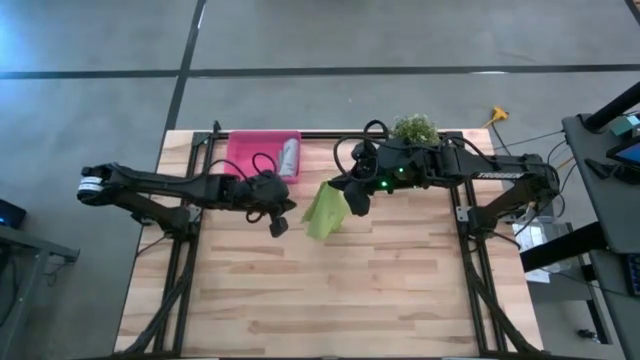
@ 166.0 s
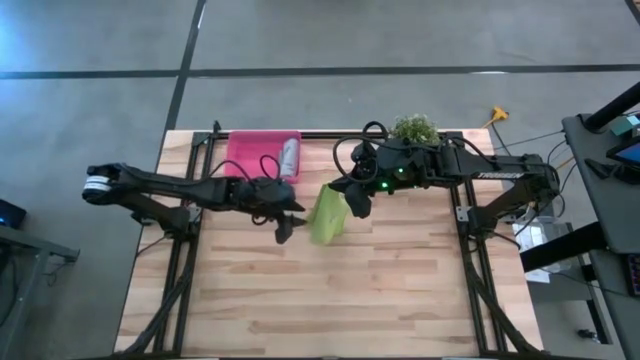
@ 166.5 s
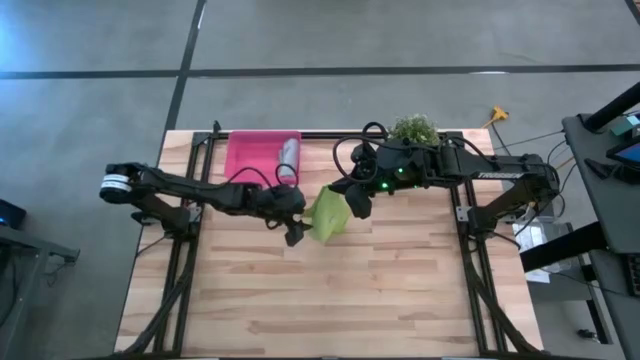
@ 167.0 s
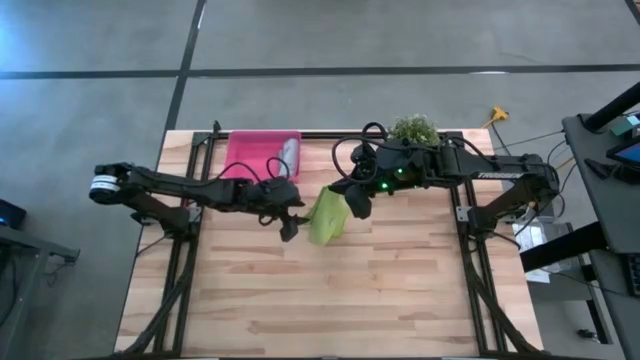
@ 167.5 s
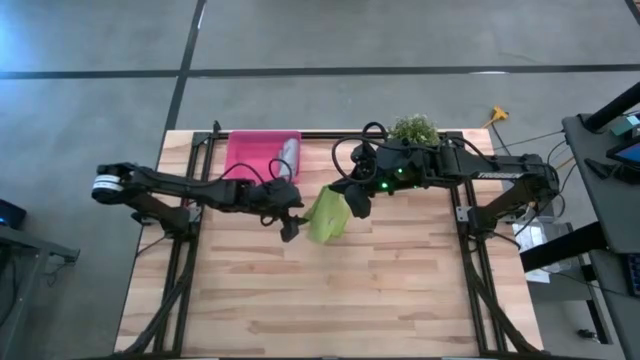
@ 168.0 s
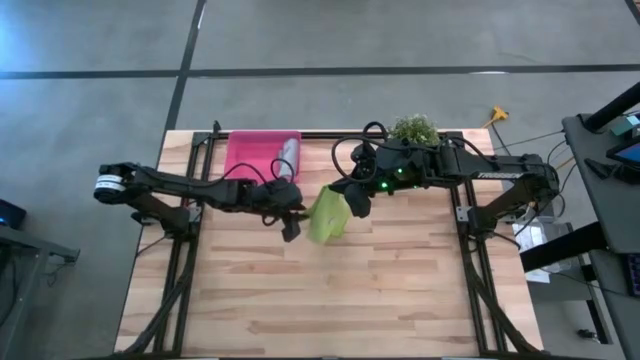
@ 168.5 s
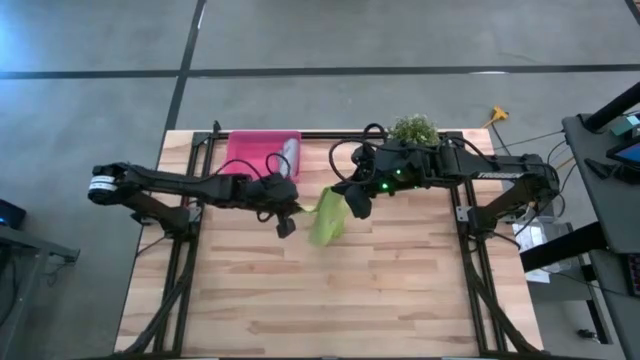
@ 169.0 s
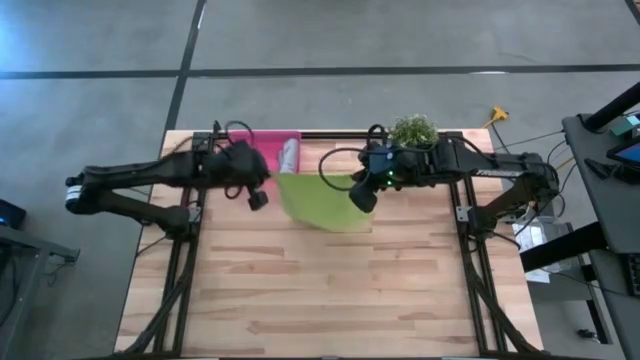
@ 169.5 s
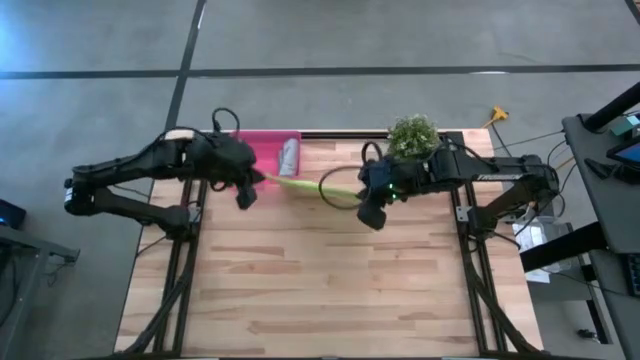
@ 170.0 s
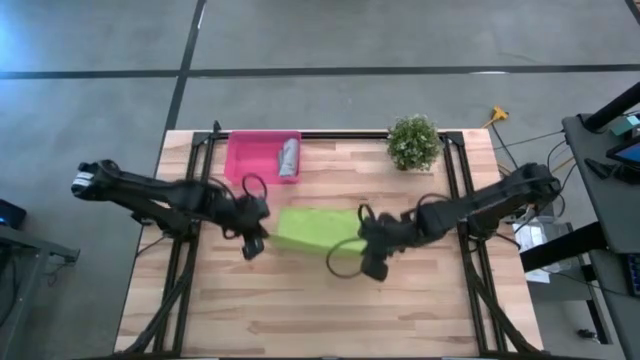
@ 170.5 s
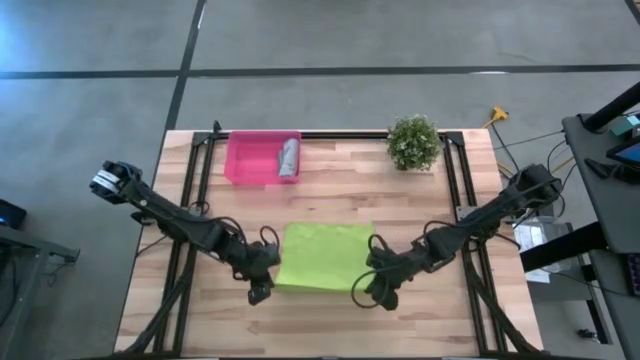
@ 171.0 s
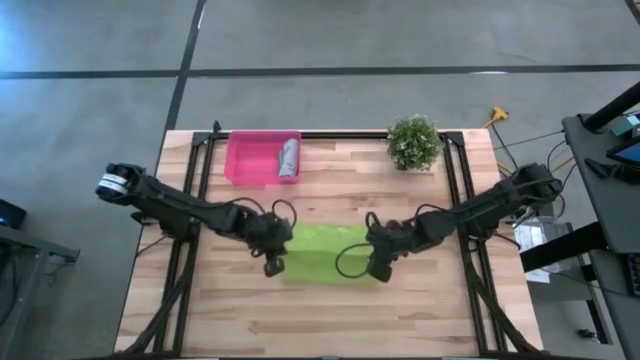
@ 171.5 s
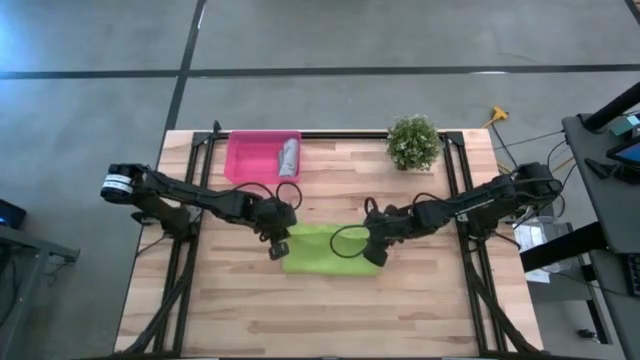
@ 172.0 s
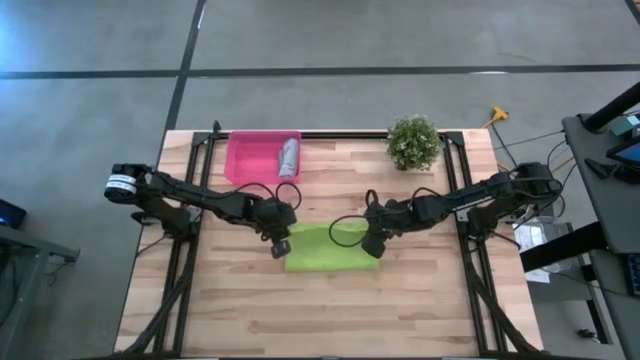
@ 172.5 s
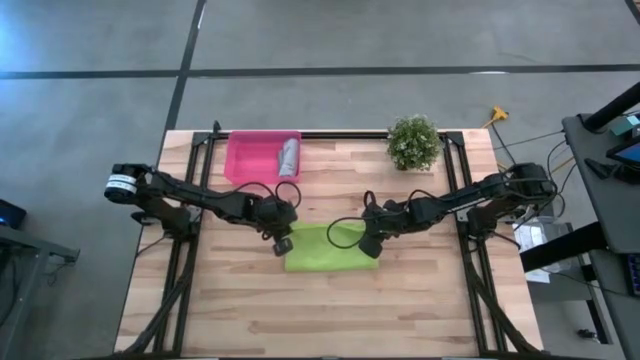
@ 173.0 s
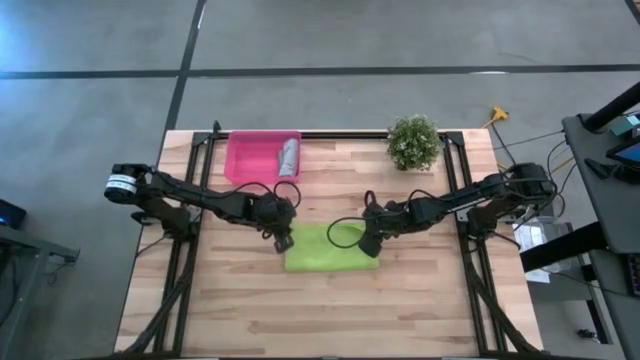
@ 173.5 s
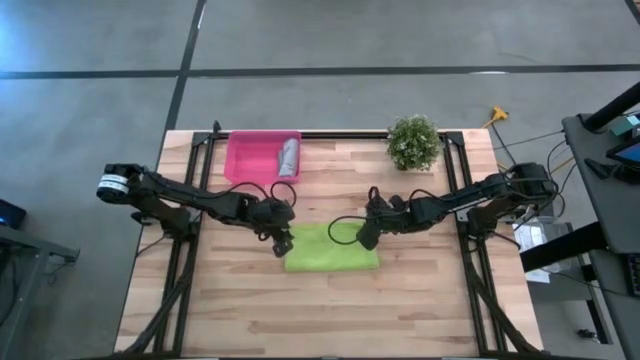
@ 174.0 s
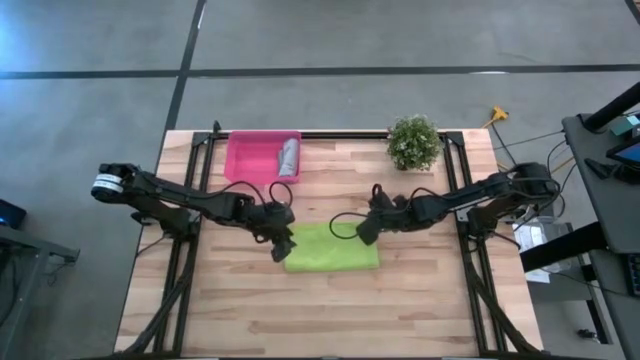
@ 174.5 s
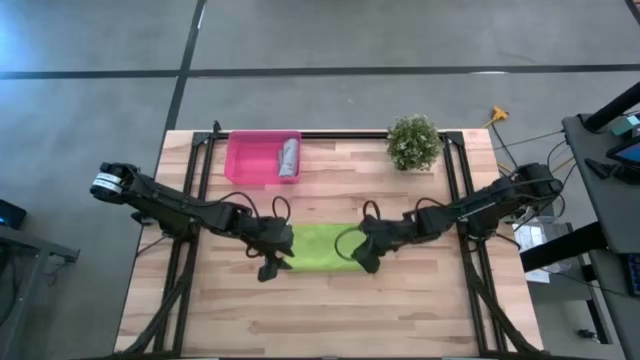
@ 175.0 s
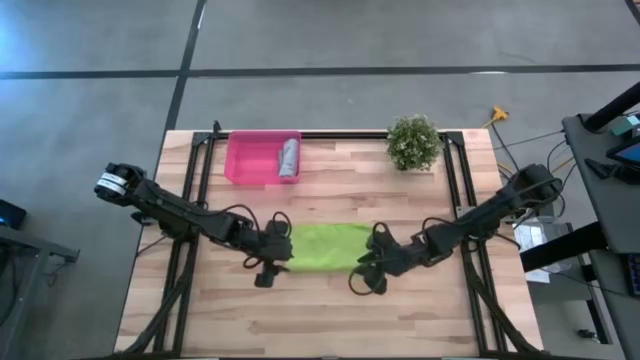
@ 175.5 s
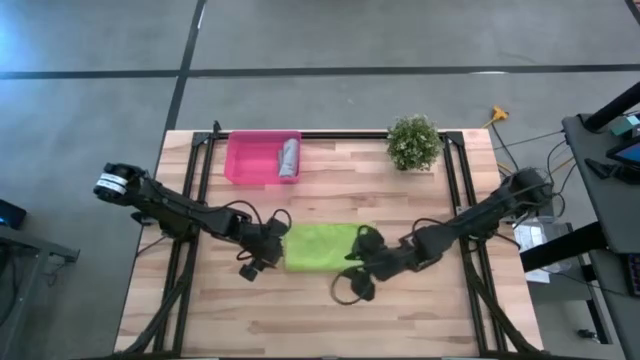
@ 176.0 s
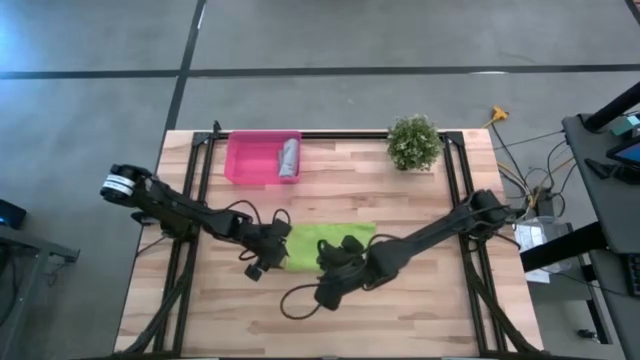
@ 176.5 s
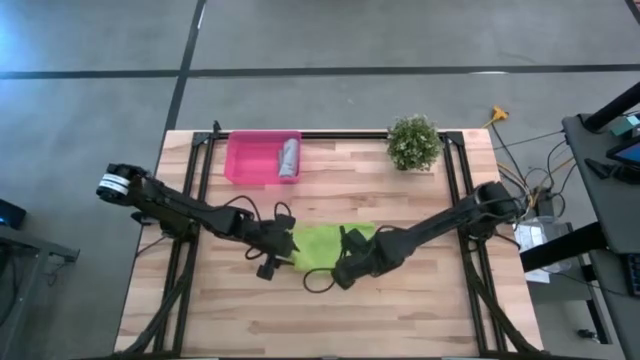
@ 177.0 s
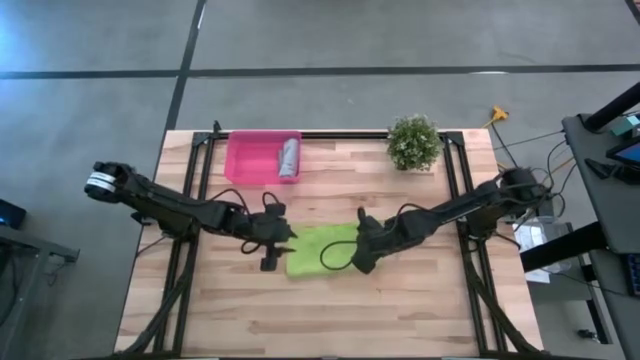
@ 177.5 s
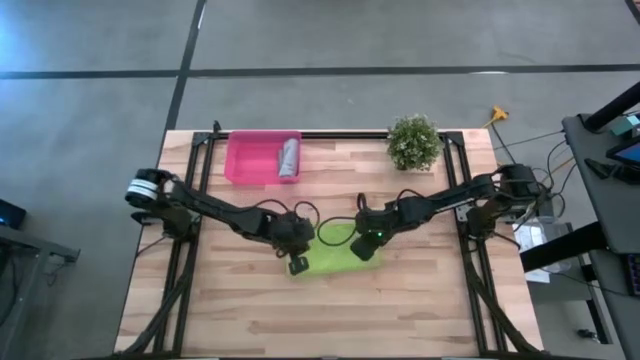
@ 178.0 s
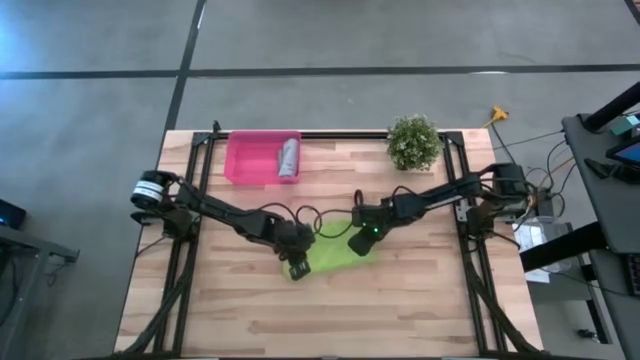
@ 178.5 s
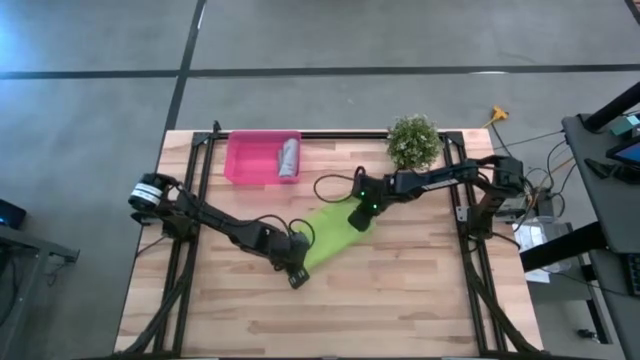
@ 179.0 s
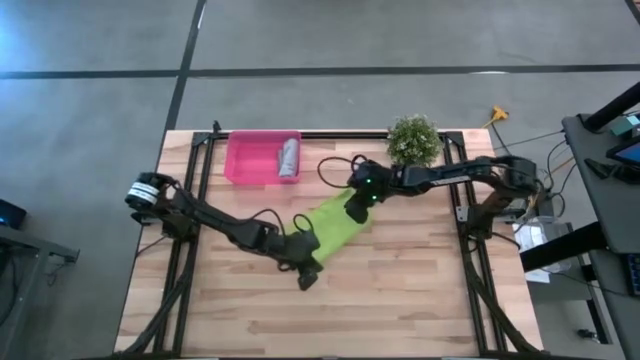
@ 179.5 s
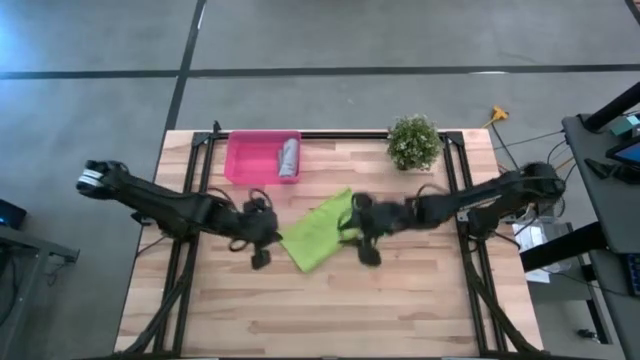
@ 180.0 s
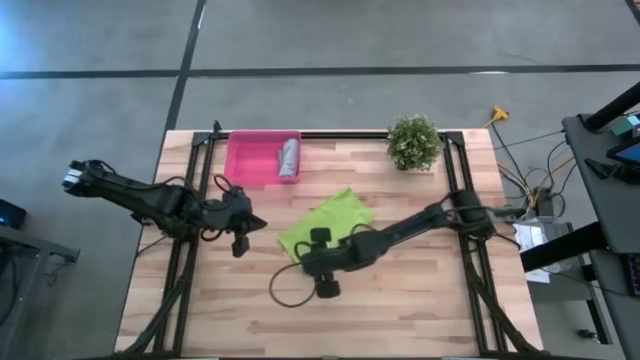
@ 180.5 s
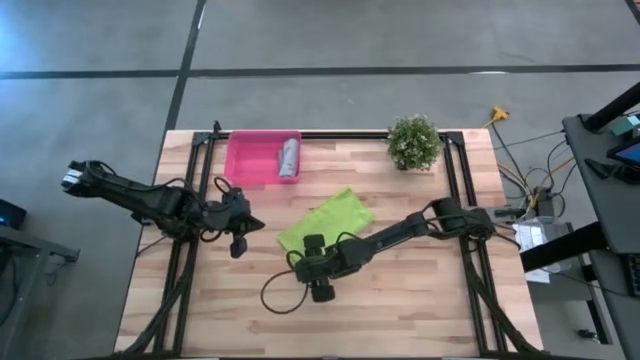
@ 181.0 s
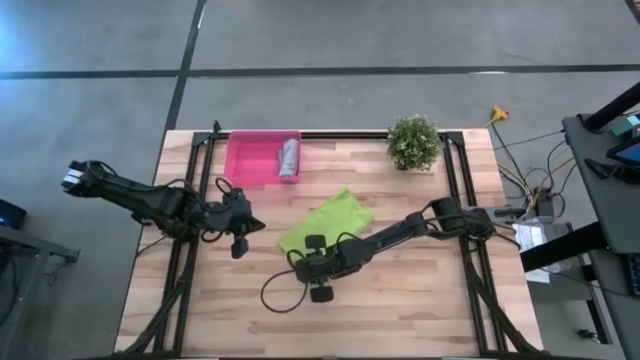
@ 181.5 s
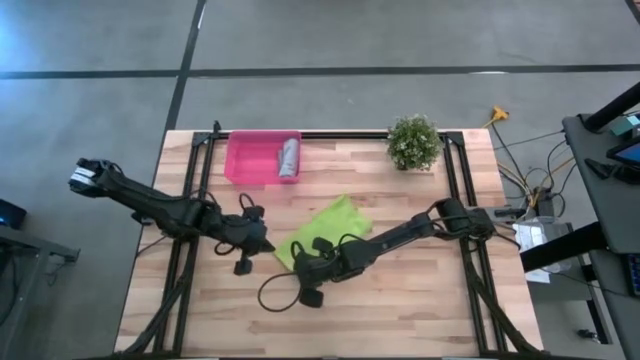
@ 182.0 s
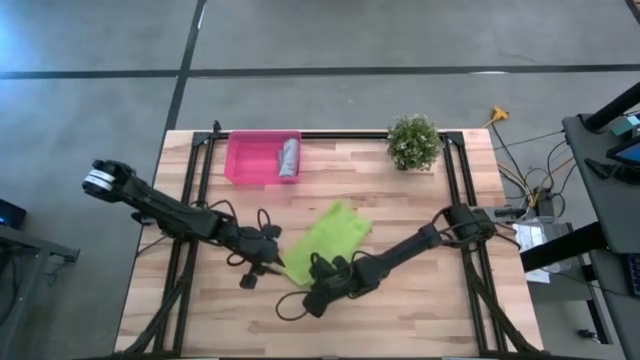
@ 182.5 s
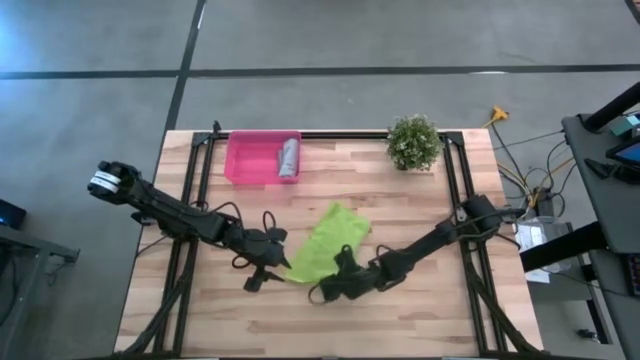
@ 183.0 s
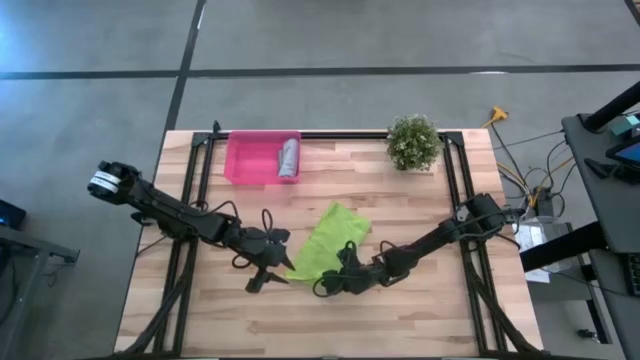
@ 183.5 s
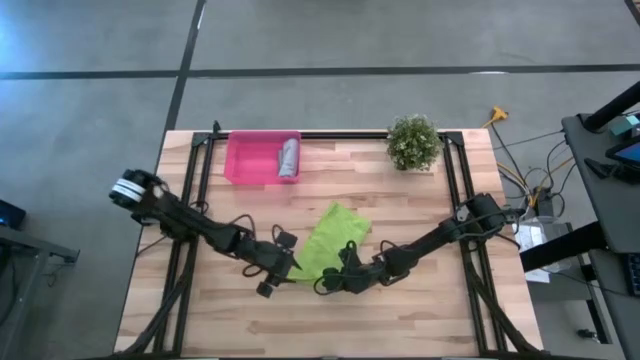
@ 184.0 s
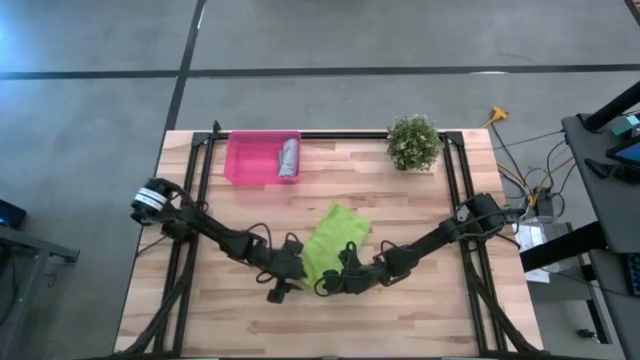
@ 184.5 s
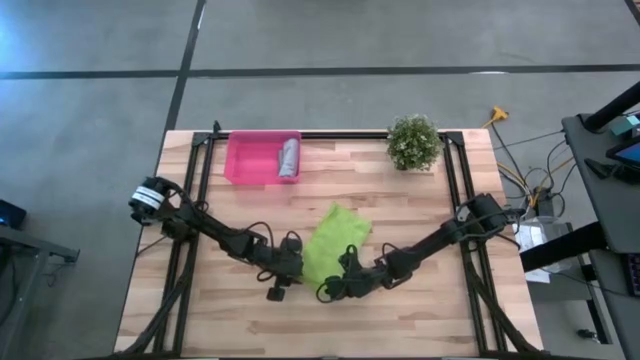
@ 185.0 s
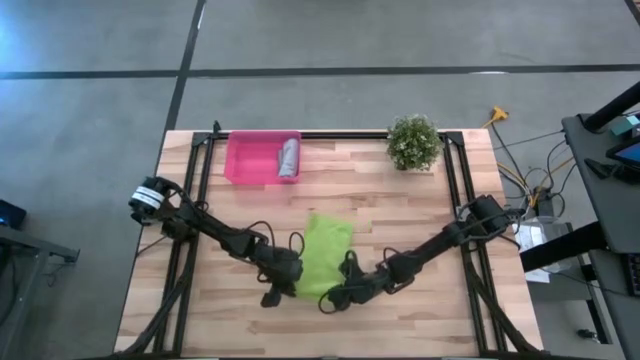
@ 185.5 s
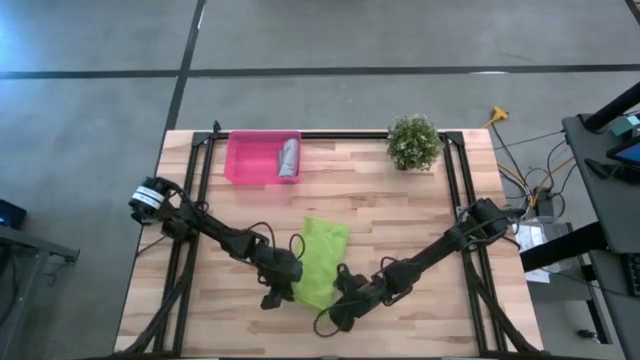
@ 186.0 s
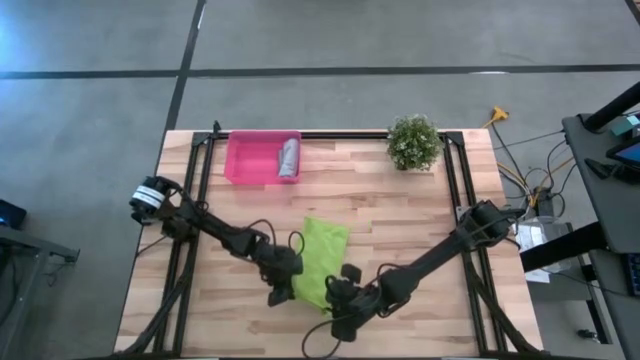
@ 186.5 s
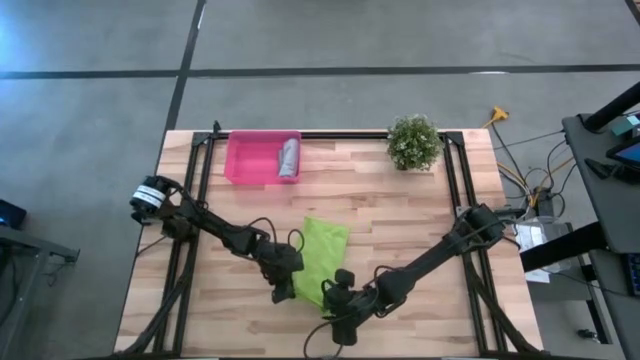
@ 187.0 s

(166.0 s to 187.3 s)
Task: Roll microfiber towels into tight, uniform cylinder then place into a basket
Roll the green microfiber cloth
